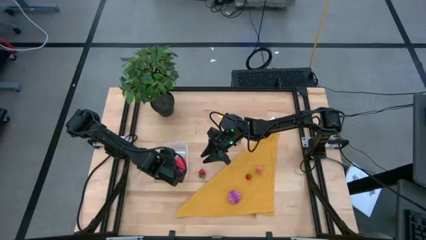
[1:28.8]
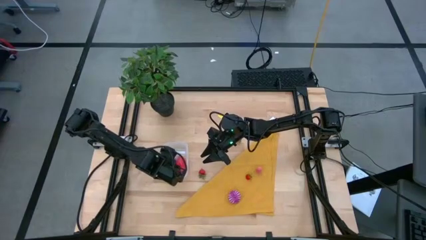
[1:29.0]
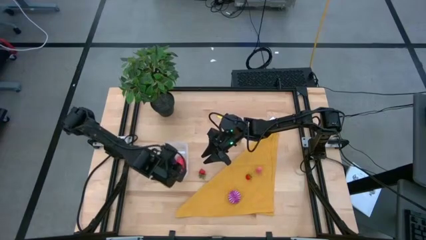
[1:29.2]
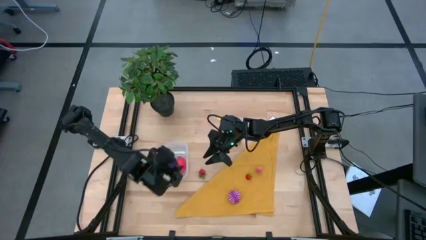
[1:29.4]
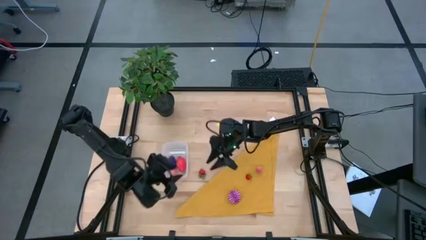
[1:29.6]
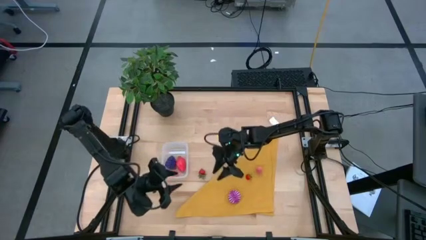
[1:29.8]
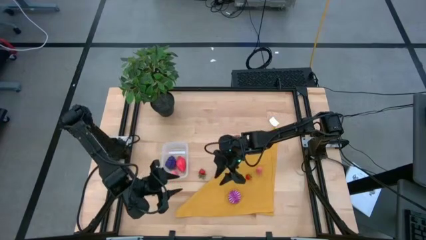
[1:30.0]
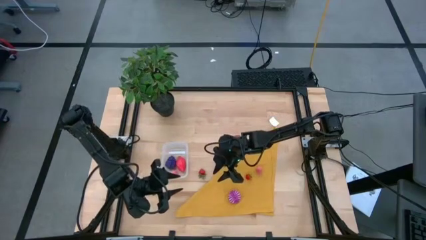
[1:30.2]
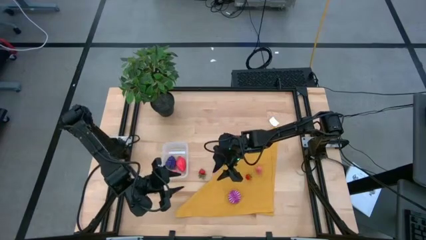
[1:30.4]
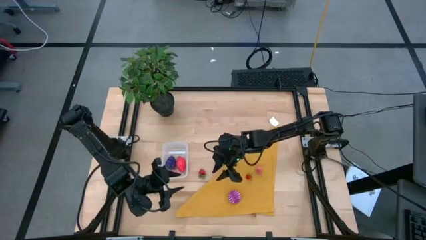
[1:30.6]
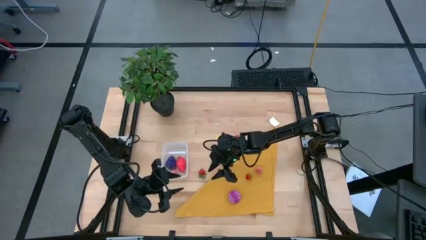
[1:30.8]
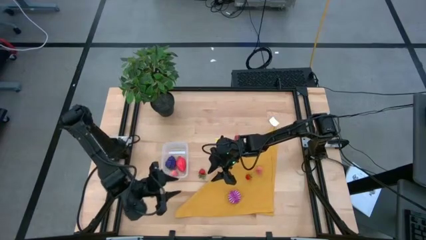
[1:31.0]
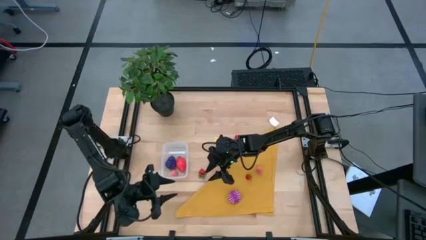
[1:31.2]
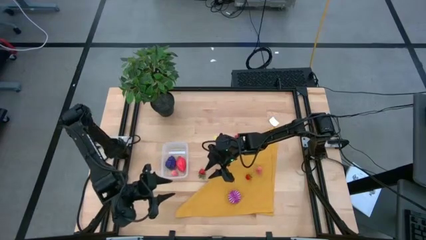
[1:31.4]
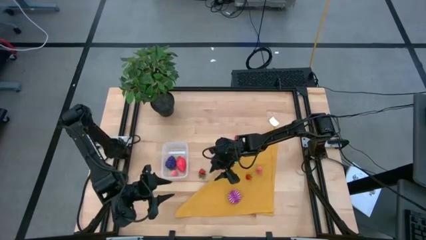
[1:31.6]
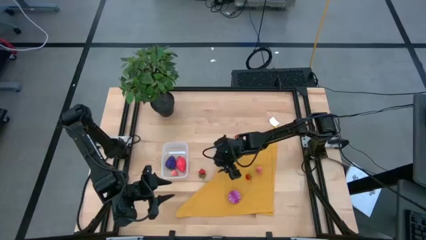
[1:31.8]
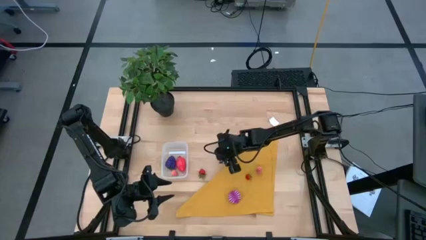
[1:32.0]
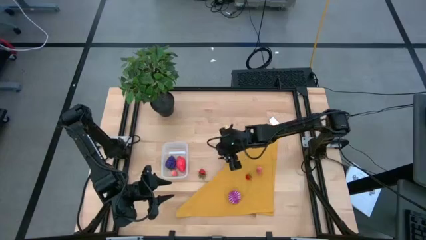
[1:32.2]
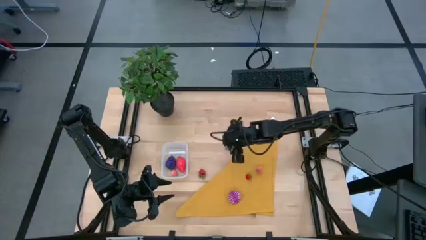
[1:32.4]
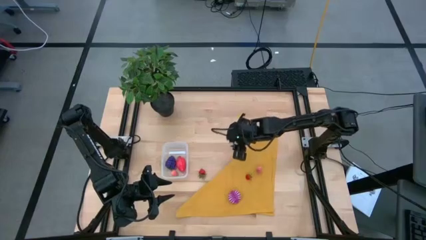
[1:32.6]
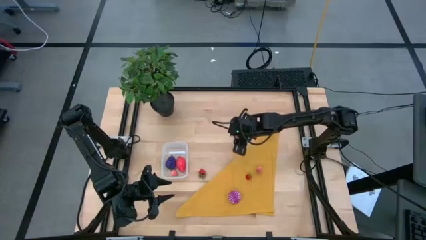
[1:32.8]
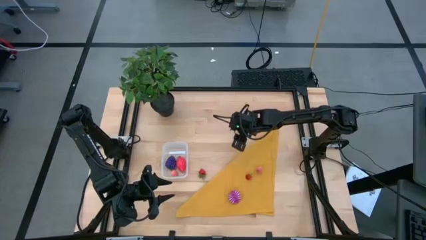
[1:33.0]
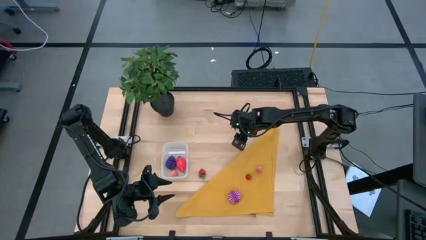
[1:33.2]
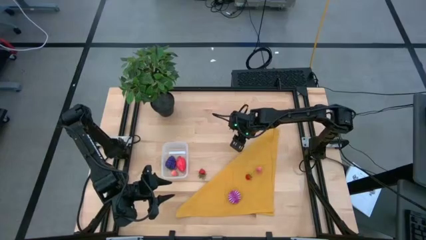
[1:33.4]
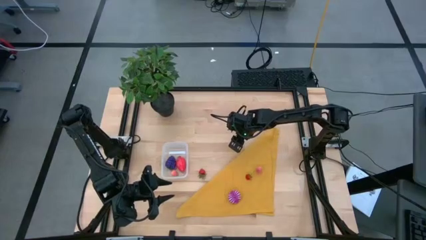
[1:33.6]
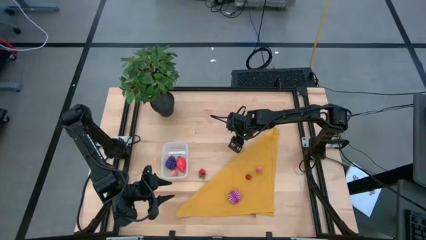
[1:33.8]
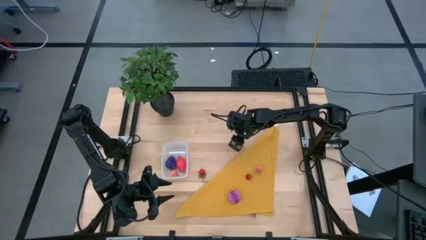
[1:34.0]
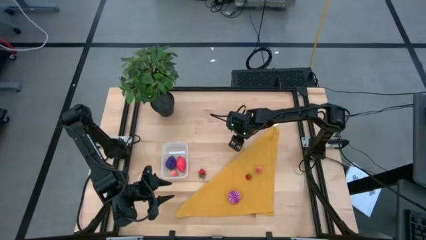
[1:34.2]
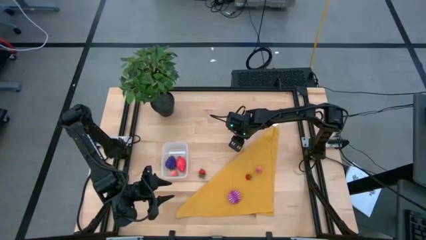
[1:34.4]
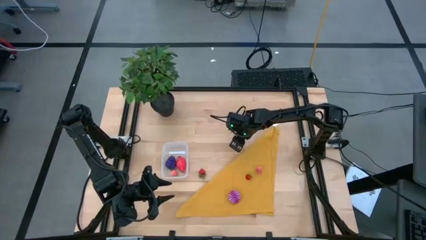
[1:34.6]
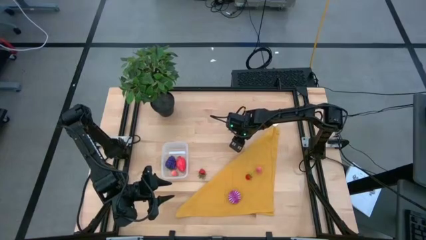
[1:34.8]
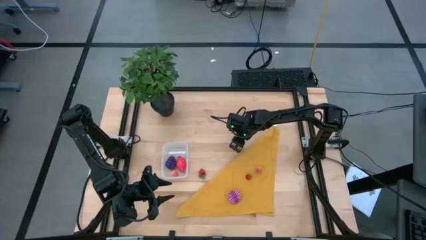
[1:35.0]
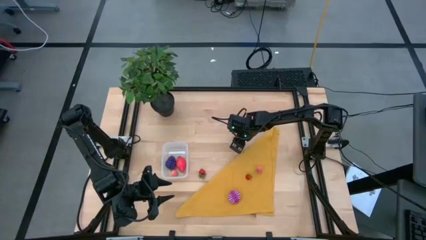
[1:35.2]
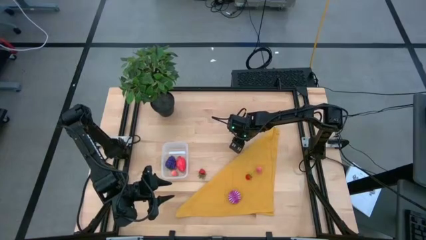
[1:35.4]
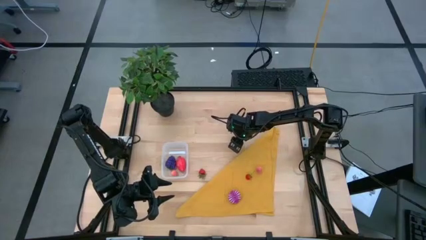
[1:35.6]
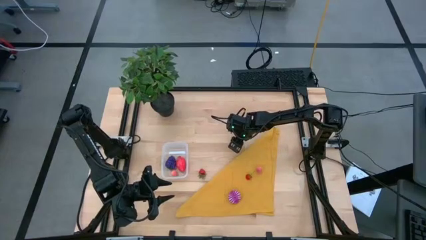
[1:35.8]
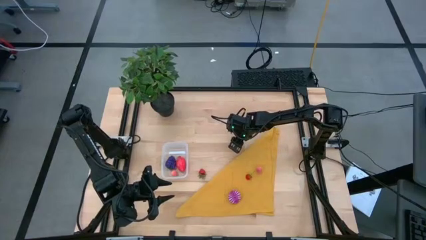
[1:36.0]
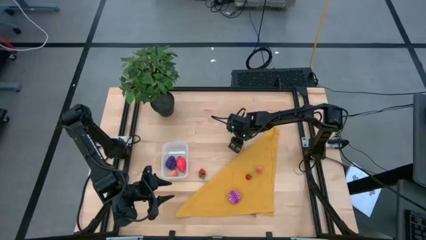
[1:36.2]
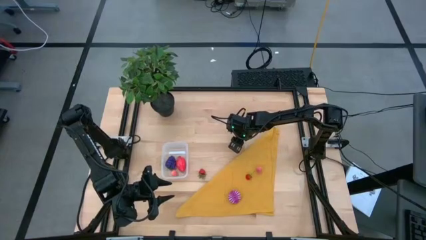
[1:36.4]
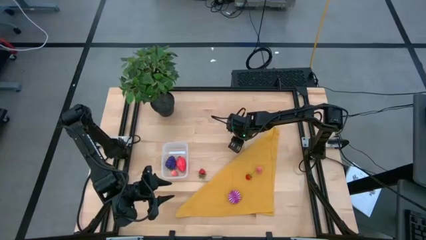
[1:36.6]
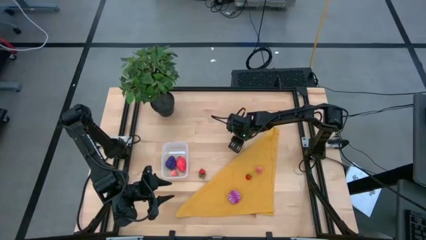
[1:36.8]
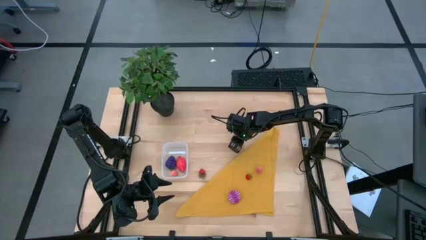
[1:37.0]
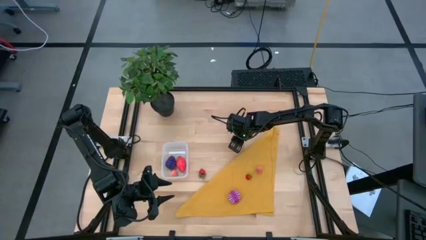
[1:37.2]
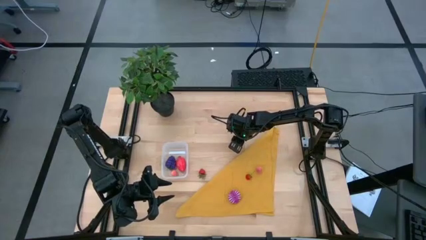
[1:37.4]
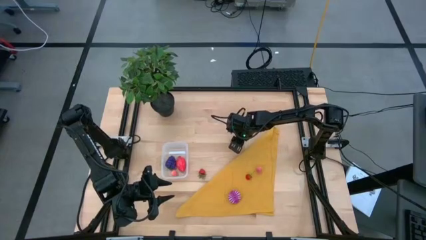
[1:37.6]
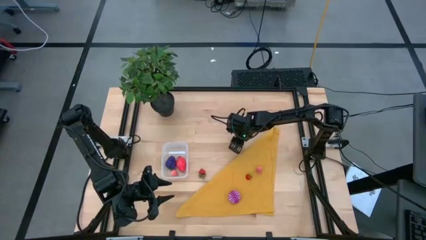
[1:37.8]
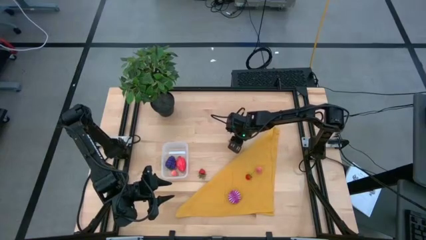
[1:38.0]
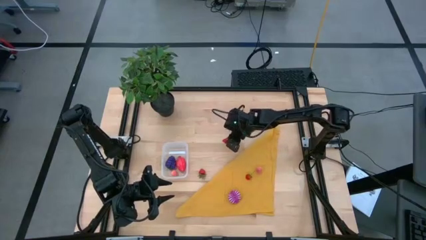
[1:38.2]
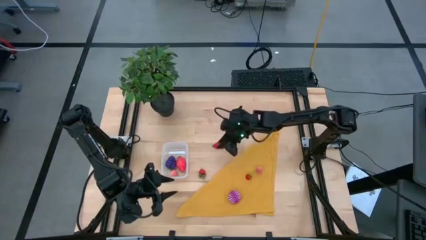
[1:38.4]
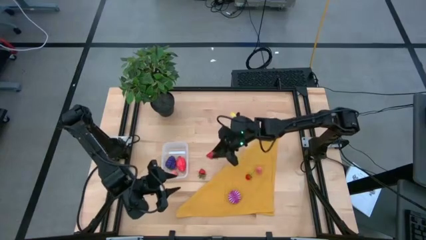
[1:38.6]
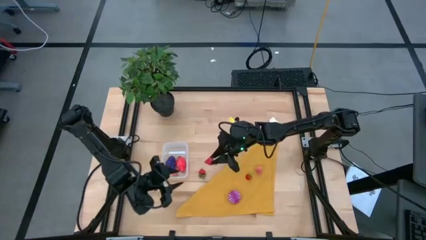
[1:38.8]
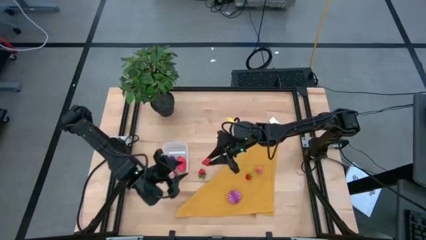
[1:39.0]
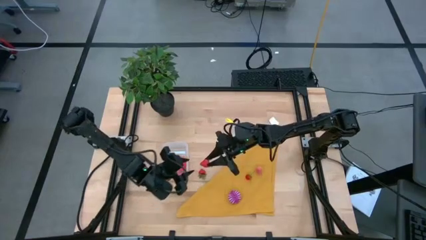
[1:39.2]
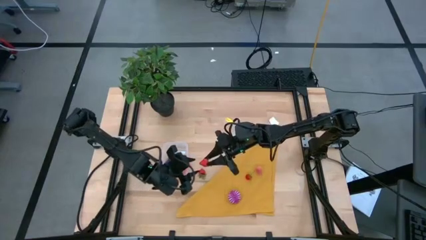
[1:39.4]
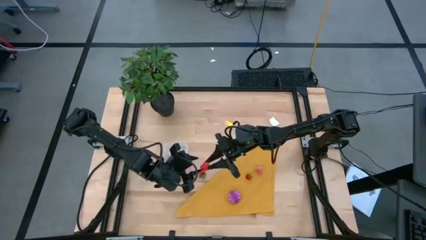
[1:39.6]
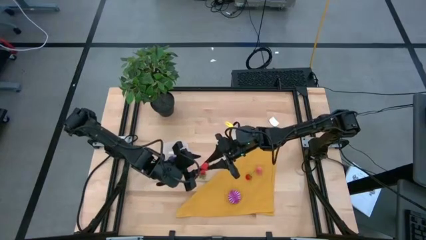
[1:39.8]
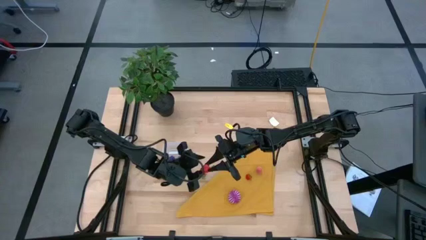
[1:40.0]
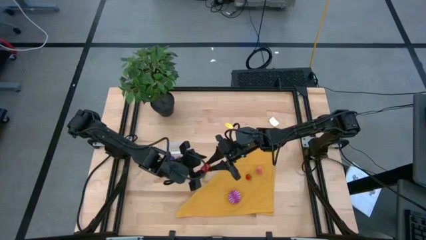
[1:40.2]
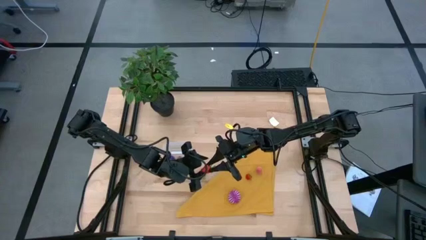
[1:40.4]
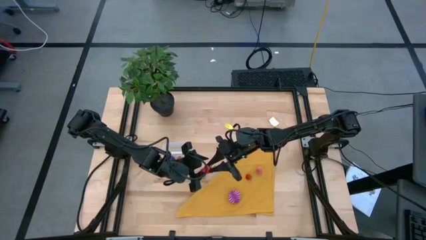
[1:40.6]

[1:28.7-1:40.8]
Task: Pick and placing Produce into tupperware
Put the top red strawberry into the transparent bin
